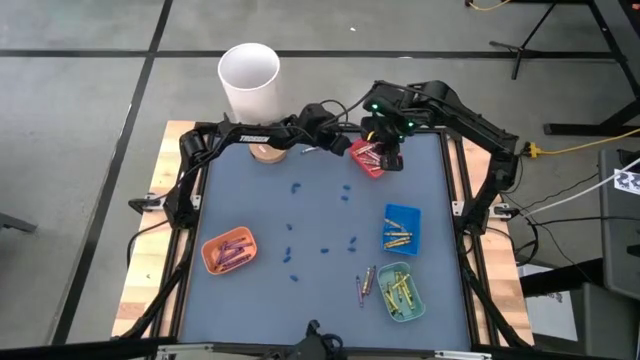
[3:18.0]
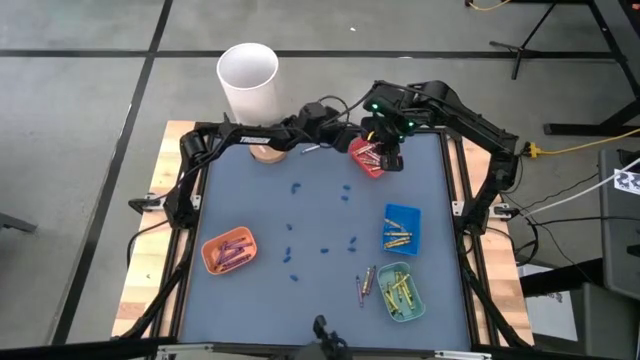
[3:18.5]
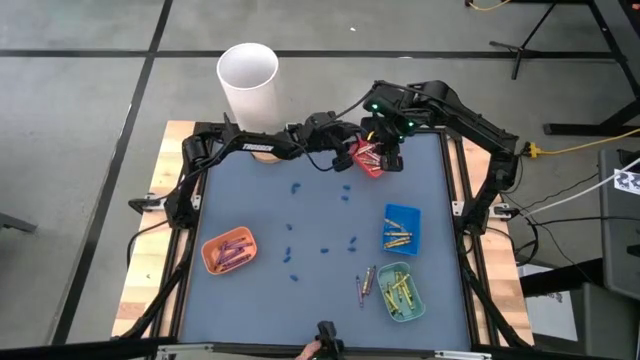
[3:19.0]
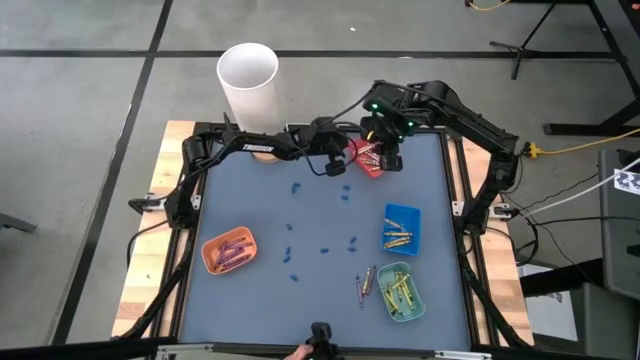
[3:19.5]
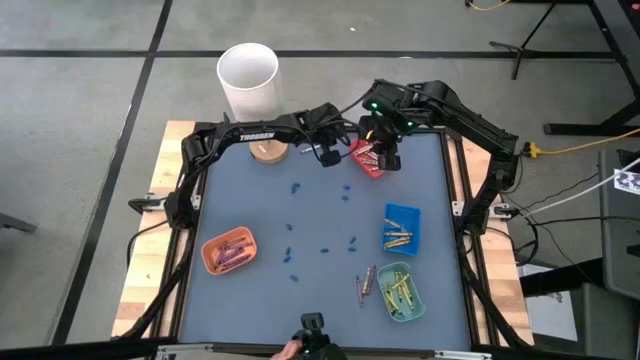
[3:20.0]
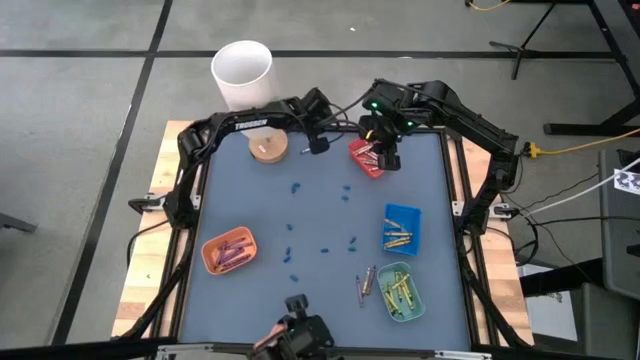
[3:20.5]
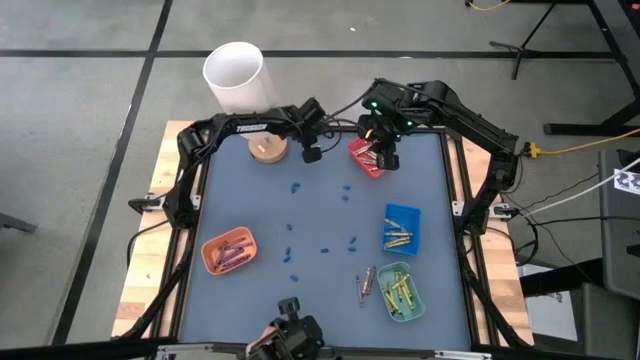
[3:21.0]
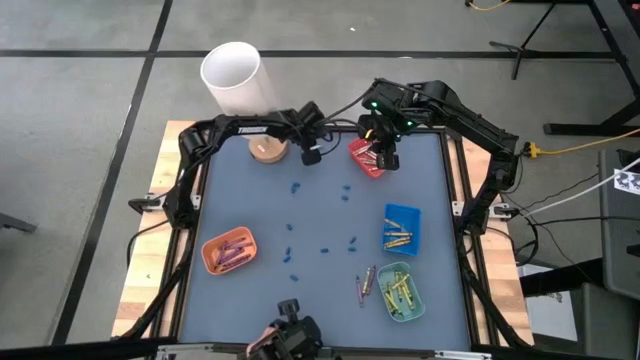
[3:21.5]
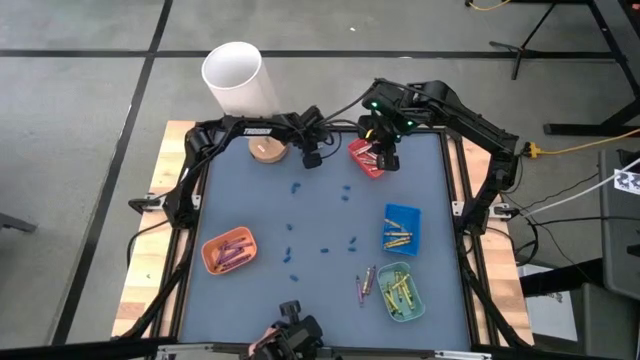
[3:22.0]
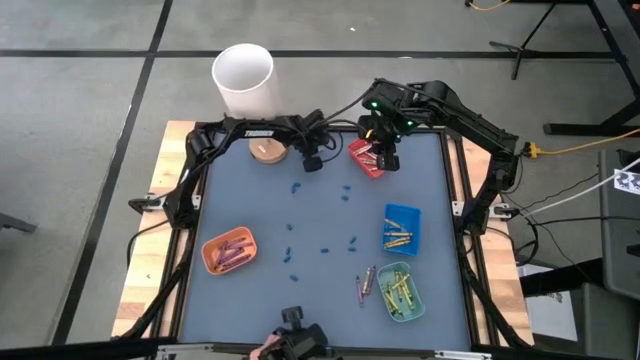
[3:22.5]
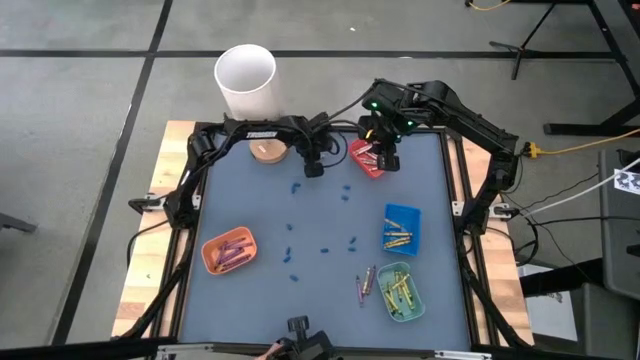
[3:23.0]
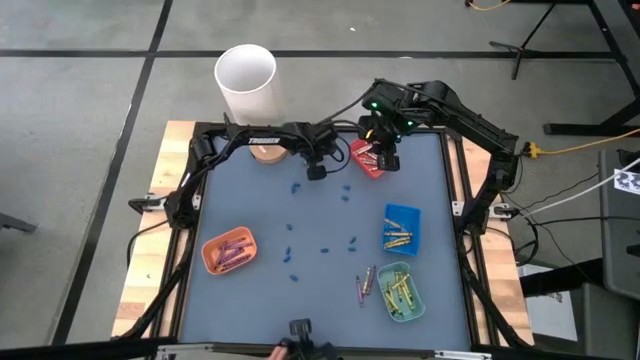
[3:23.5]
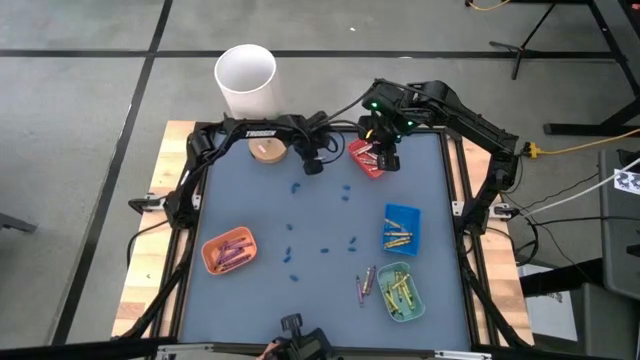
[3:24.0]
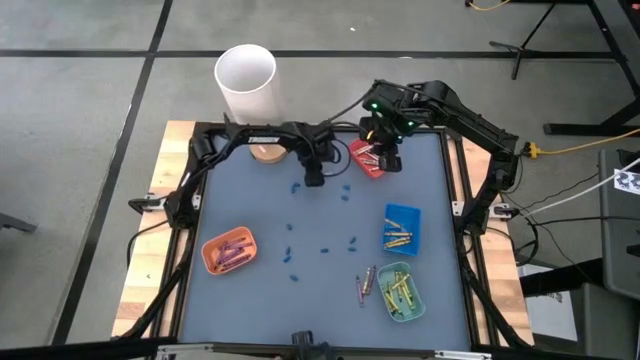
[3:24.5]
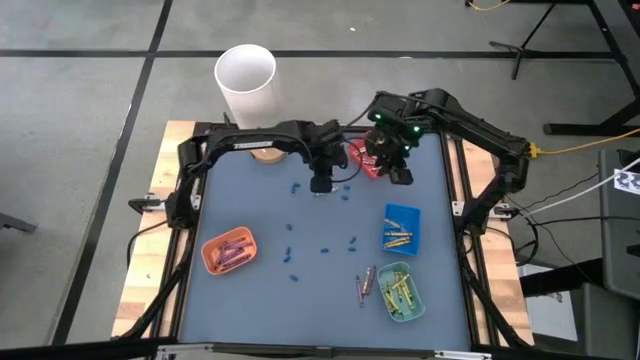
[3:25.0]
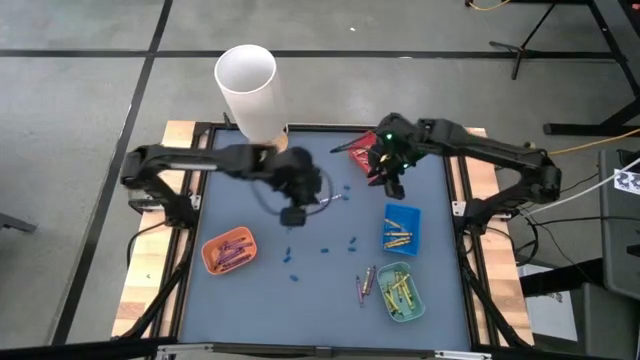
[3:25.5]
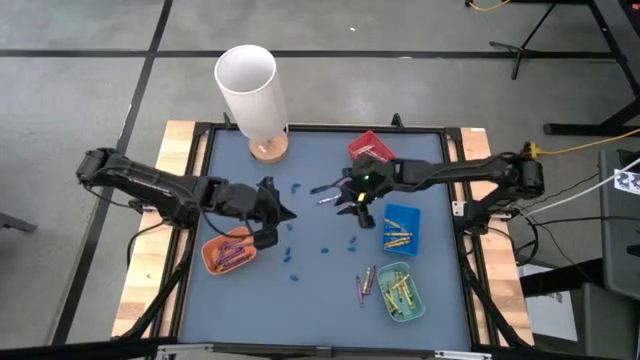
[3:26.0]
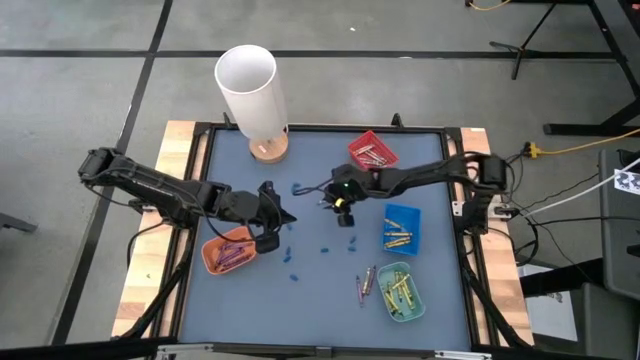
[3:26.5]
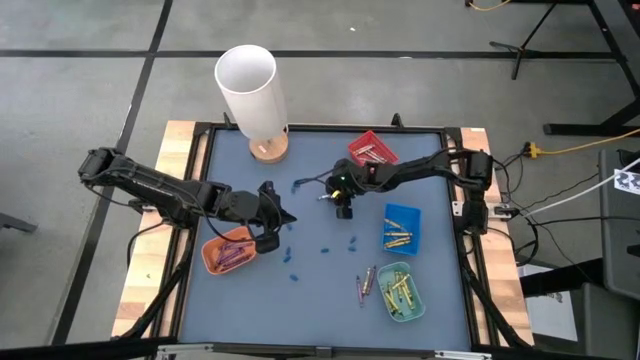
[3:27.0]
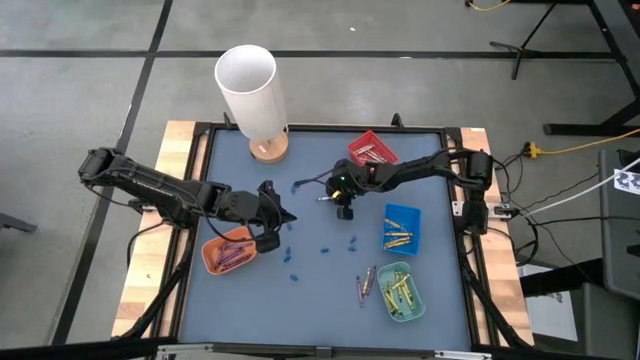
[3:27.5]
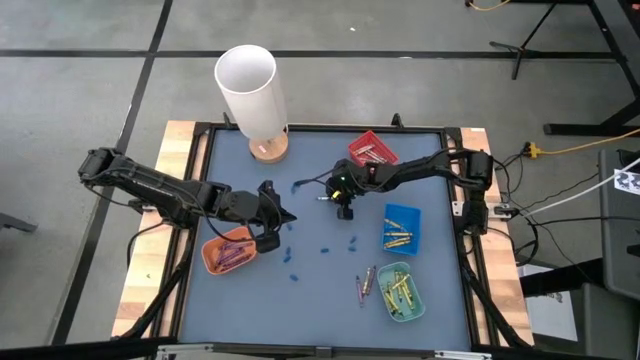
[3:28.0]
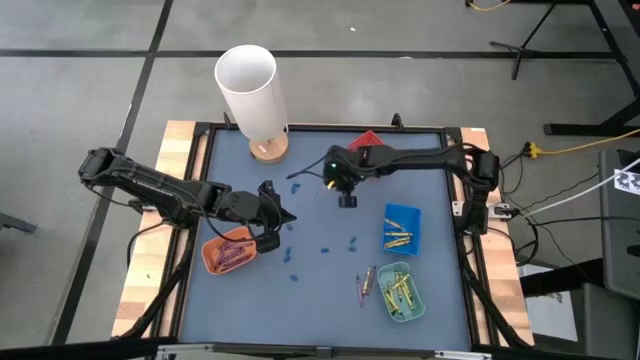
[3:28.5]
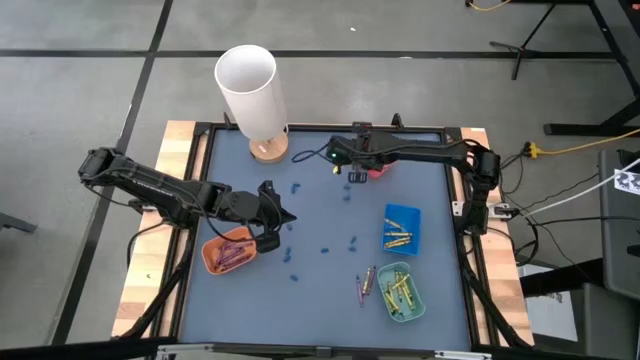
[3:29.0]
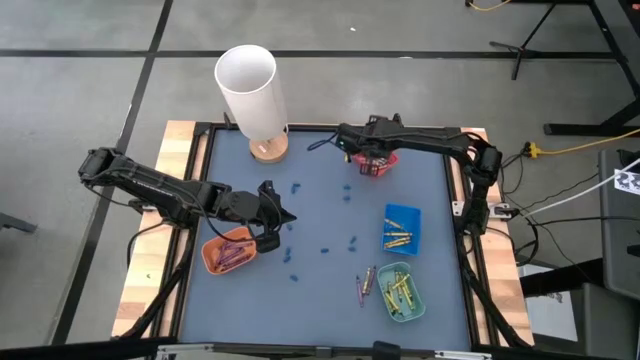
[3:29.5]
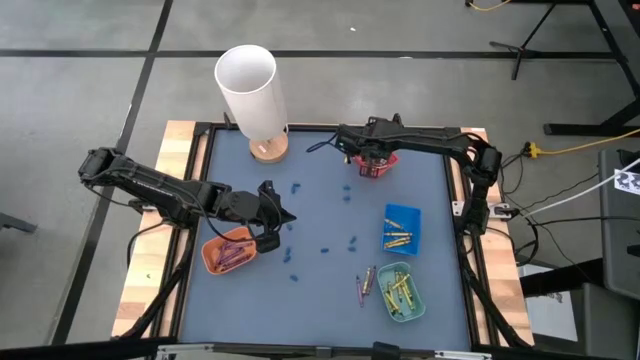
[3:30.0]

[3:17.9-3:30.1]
Task: Sort crayons
Put the grey crayon into the red bin

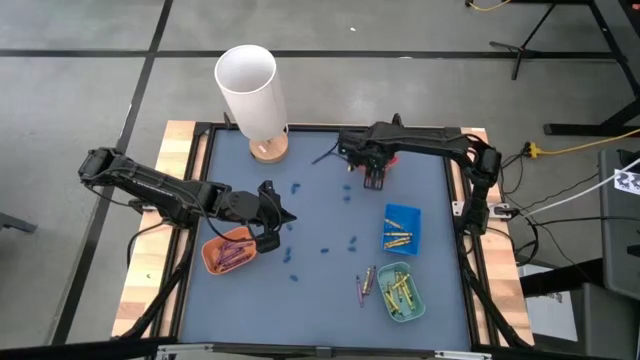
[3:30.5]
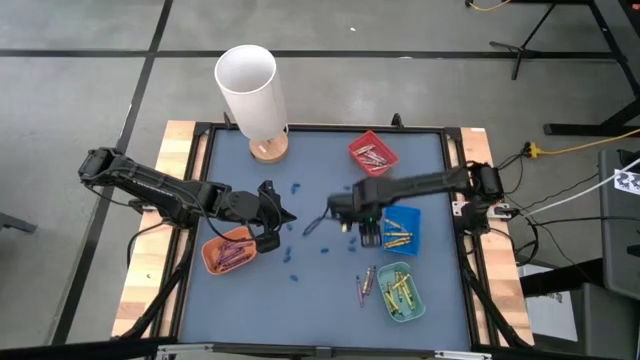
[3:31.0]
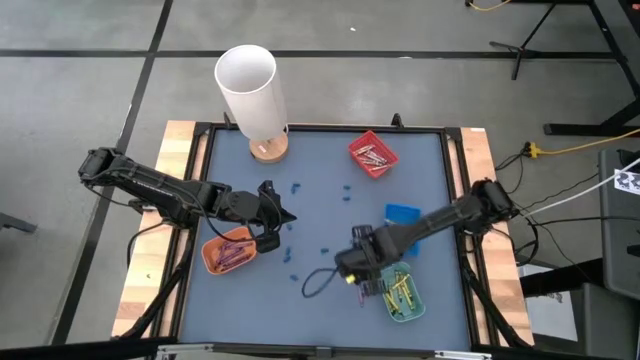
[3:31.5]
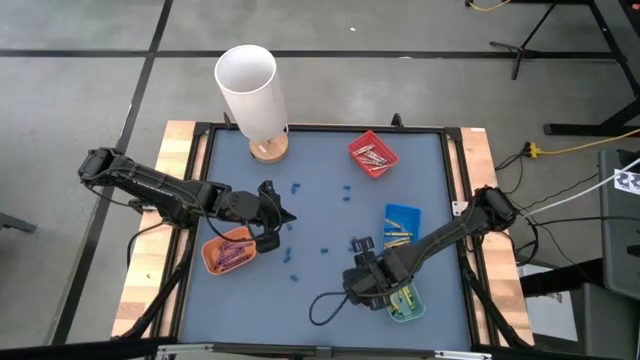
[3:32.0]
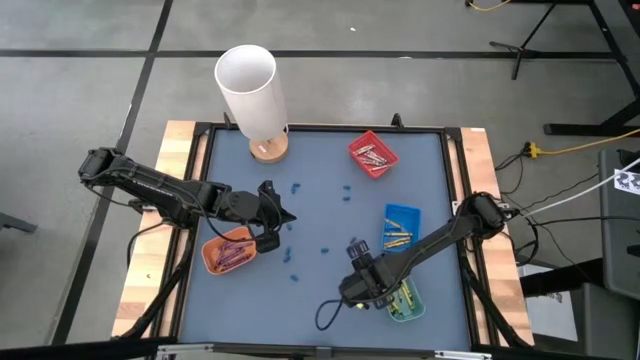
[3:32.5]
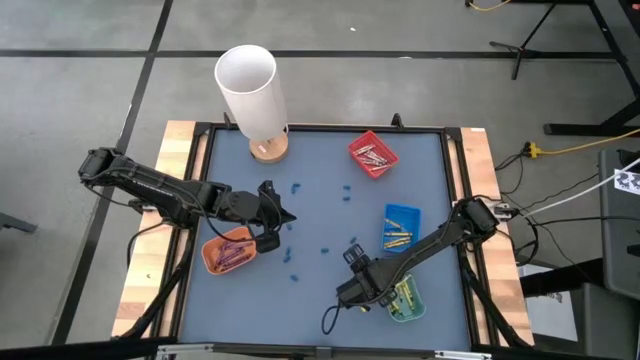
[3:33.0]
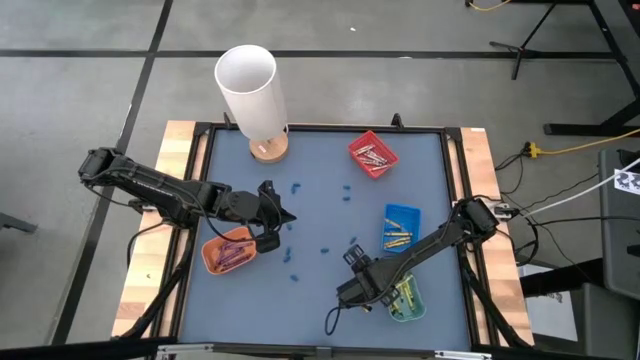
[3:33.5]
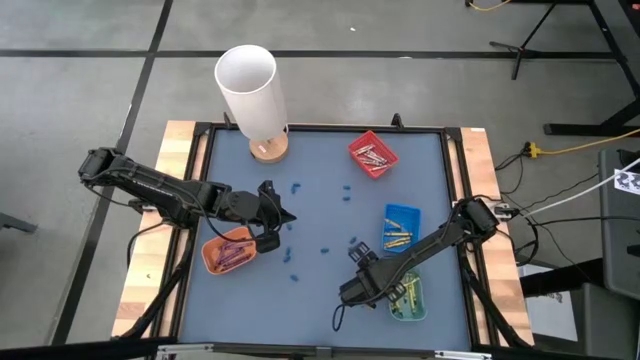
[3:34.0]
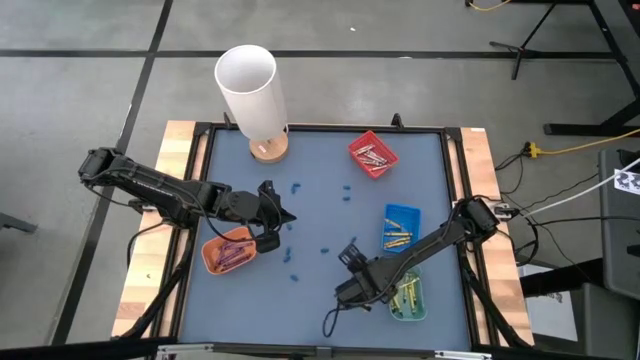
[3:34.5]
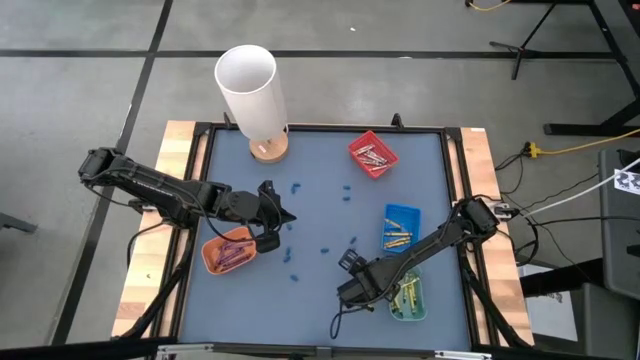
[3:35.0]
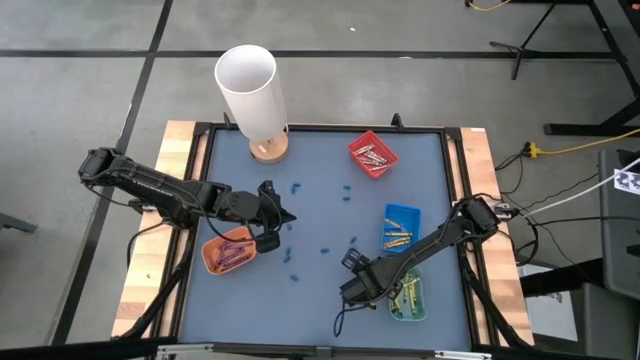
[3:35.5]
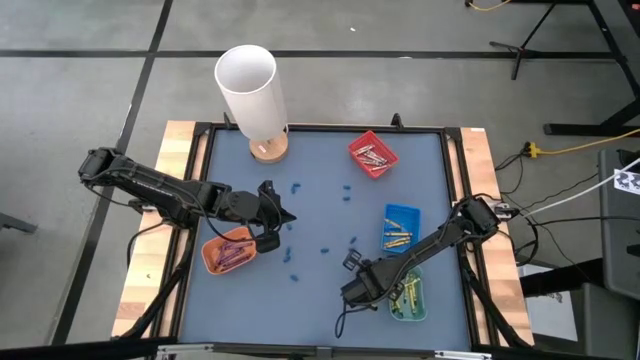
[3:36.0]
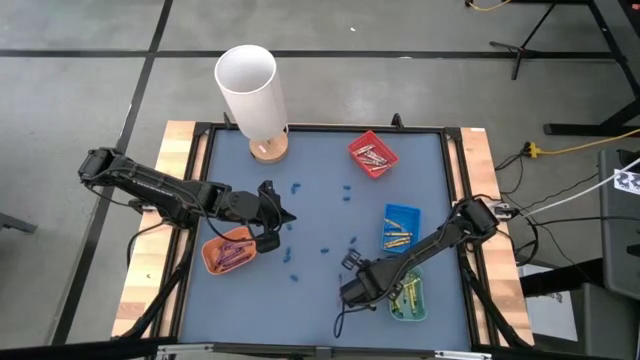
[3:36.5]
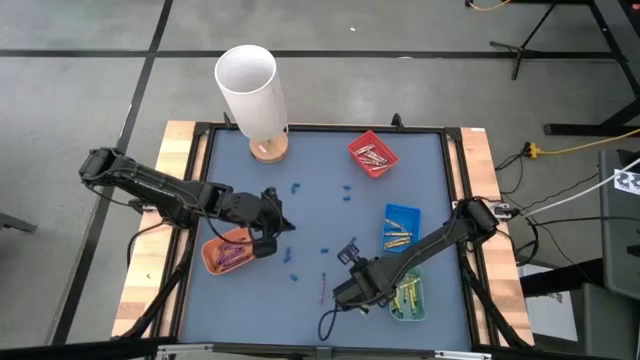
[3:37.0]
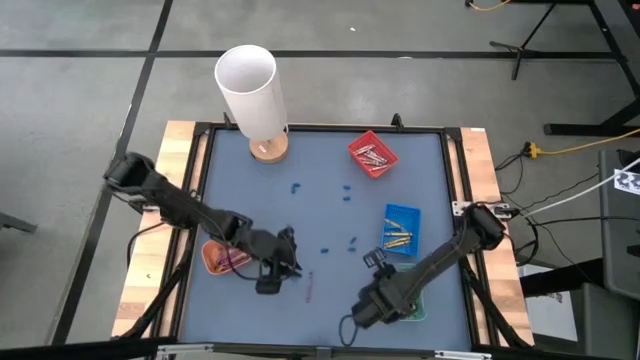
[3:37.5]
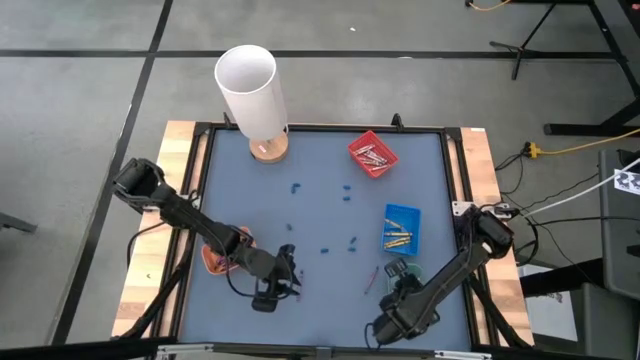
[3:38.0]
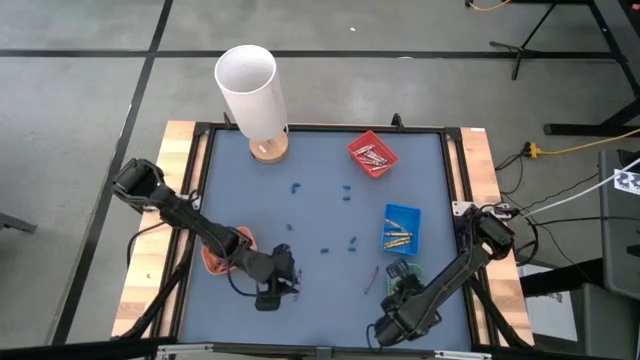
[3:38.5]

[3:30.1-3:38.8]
Put the green crayon into the green bin
